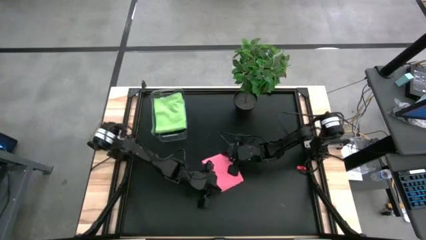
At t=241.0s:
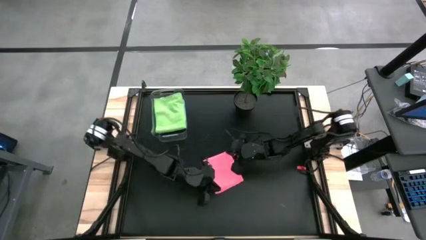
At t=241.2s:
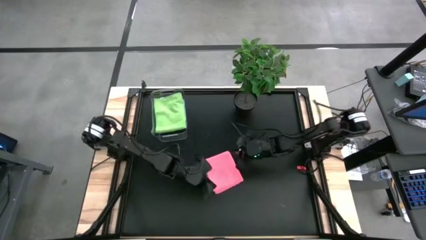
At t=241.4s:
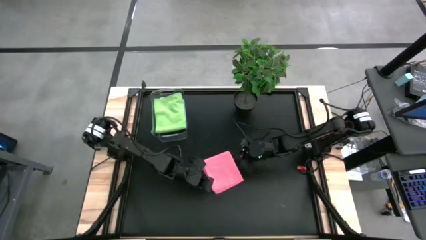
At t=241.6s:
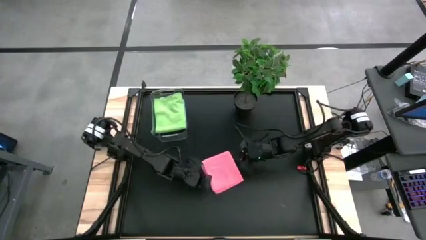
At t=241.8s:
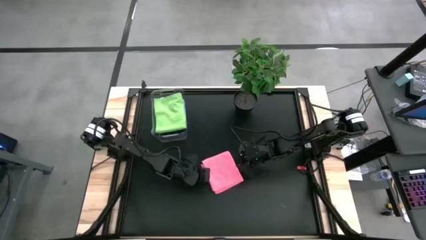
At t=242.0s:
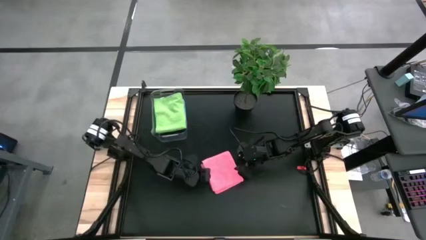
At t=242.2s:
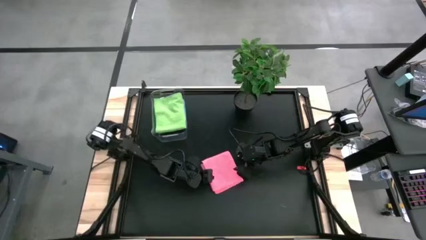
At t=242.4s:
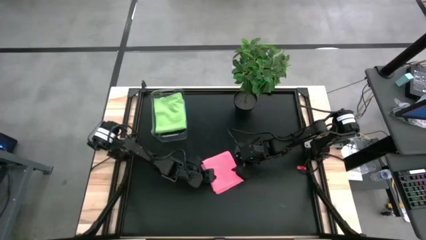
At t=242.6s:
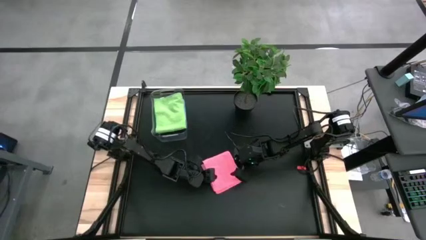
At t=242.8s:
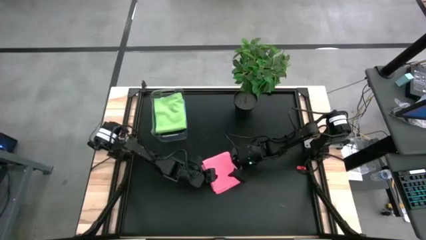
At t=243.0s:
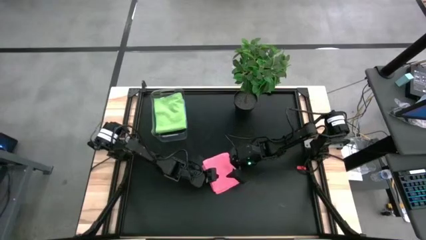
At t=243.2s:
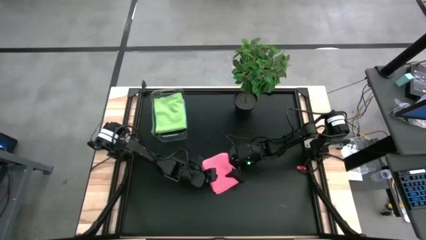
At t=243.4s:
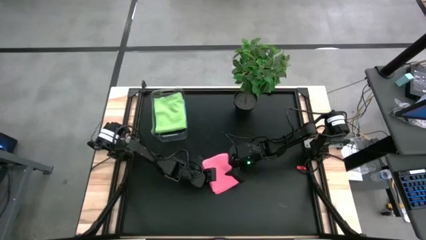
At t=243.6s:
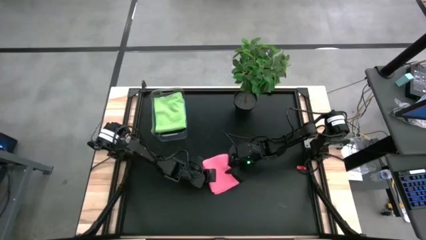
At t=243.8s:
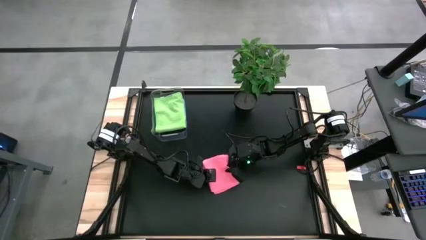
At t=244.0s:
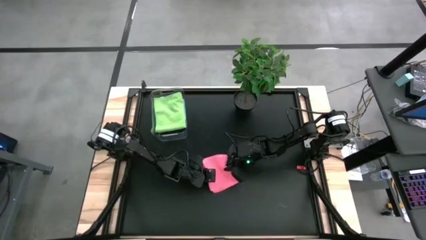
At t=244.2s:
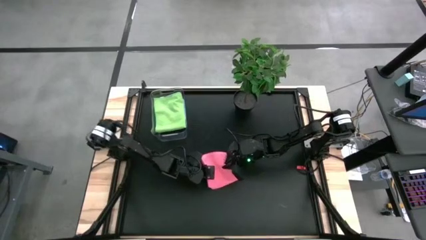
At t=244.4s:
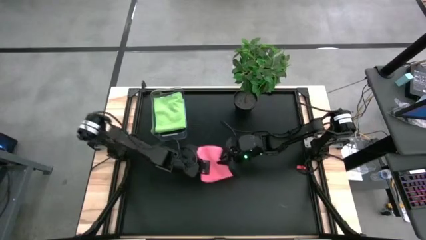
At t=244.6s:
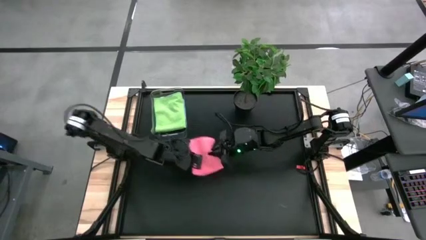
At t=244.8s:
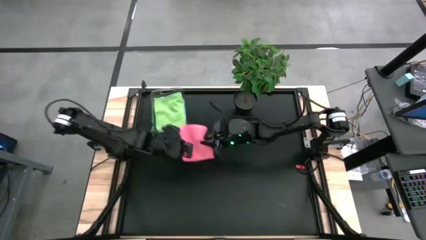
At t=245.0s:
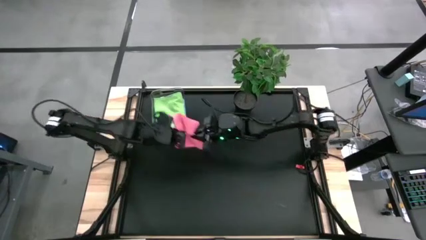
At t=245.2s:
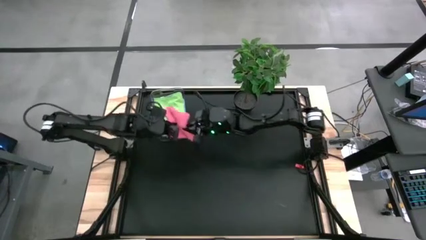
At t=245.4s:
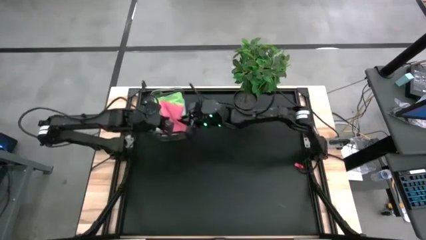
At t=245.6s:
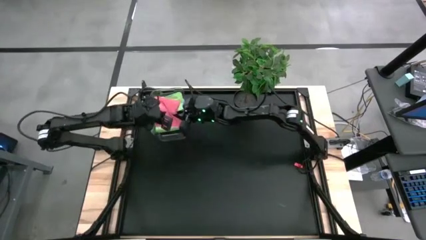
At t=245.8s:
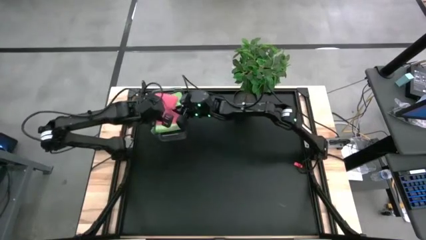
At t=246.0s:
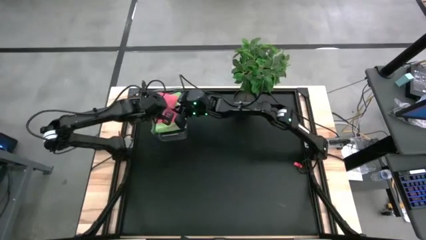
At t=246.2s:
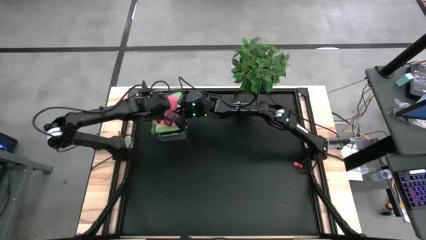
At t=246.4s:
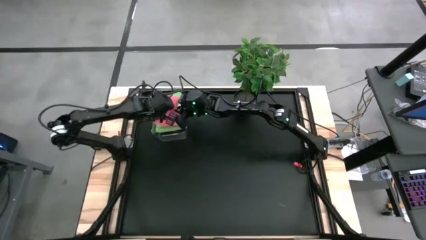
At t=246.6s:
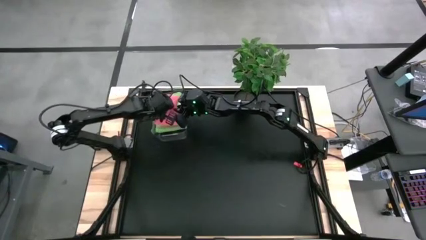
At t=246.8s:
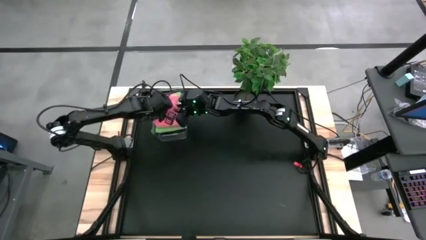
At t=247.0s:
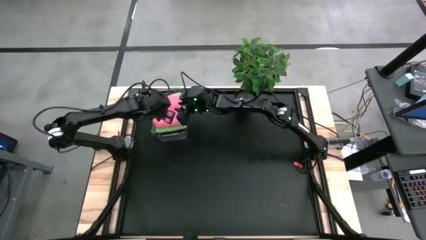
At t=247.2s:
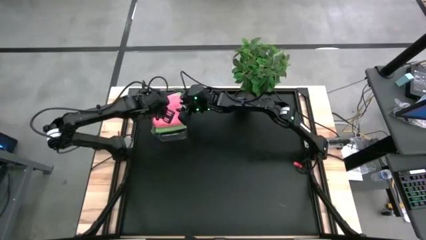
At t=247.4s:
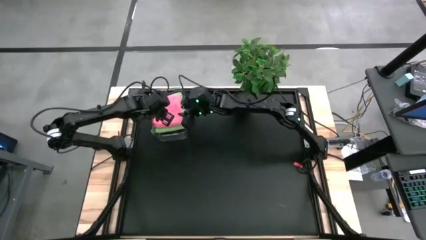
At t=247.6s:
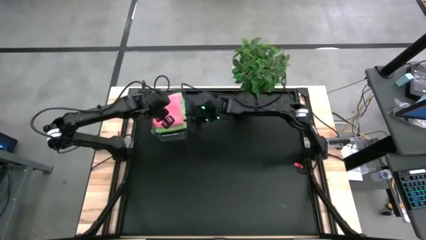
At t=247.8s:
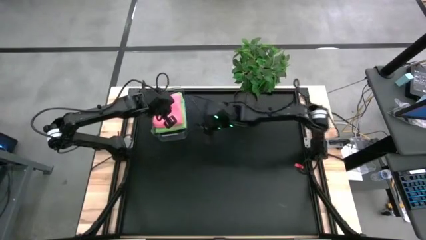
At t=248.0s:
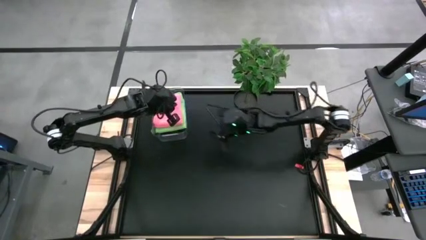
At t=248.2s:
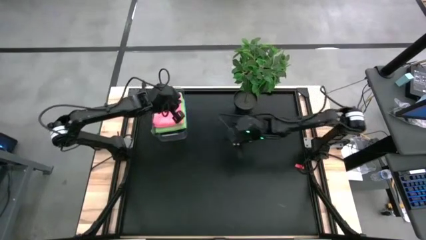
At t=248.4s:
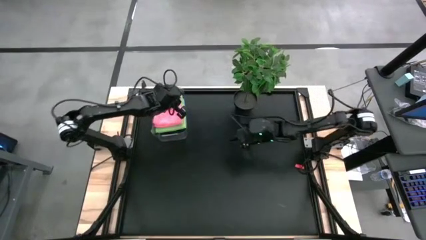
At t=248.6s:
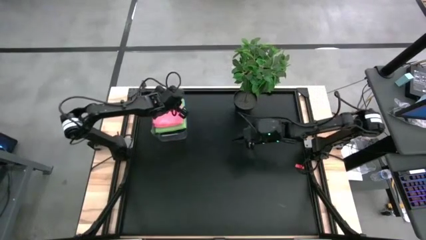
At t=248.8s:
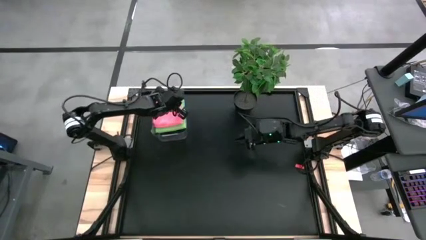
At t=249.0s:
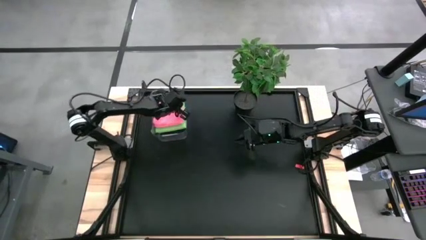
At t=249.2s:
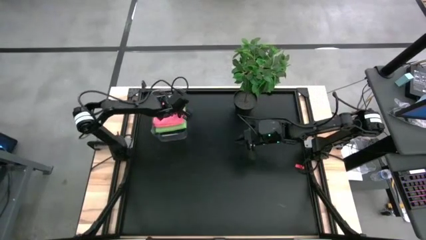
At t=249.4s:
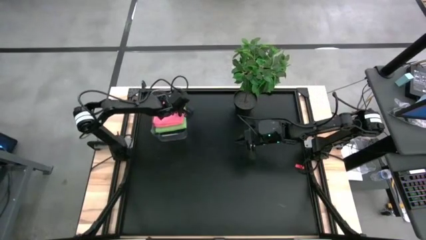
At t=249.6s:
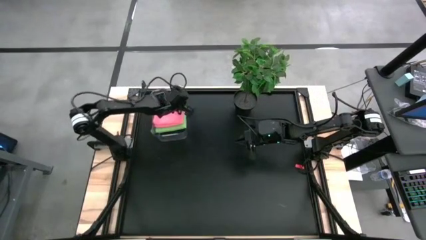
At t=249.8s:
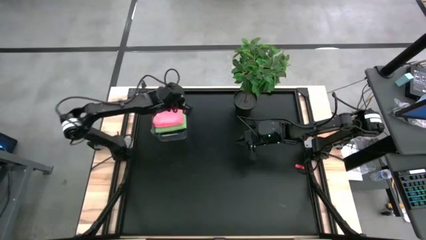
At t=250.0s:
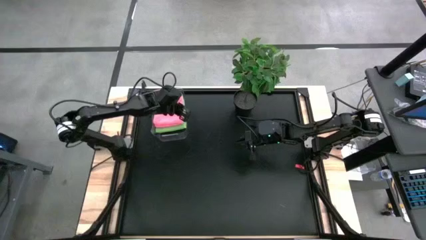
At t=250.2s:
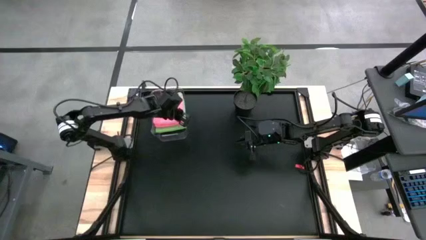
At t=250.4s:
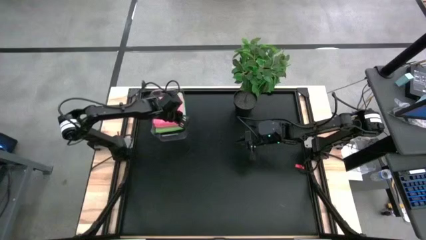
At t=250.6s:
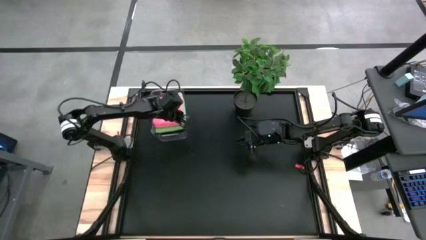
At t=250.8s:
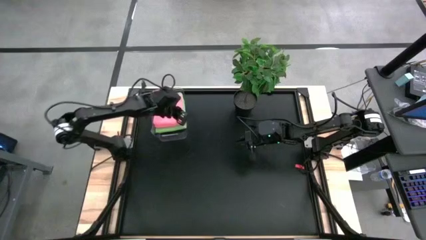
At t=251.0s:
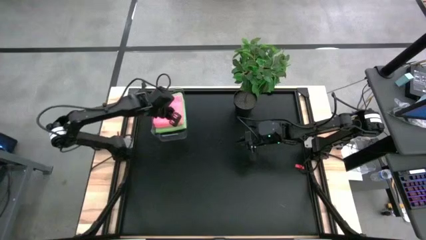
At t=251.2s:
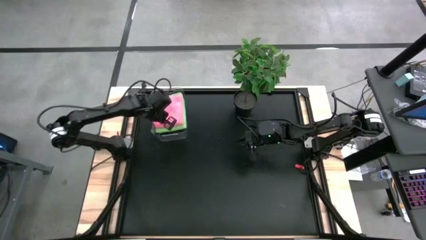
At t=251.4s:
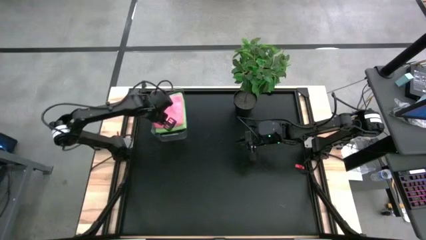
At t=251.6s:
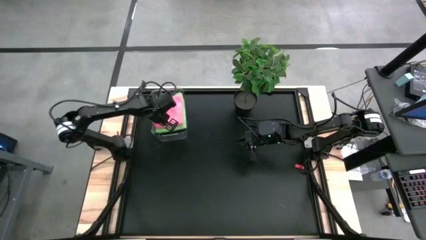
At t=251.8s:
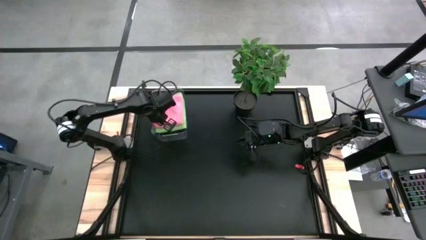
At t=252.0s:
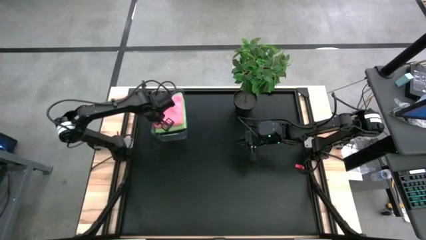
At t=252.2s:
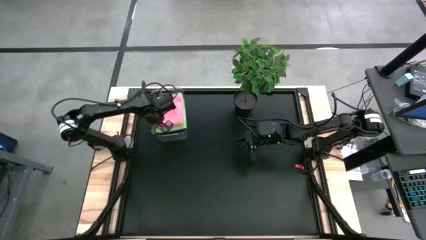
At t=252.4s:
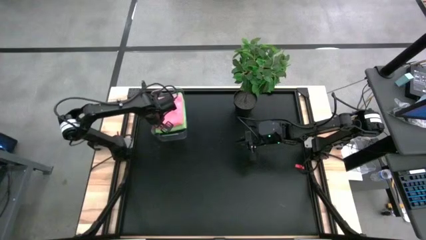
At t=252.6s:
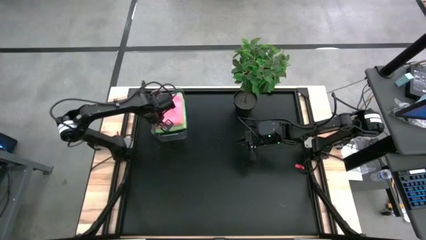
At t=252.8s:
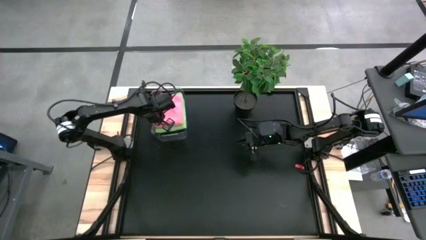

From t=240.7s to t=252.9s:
Task: Fold microfiber towels
Put the red micro fiber towel into the bin

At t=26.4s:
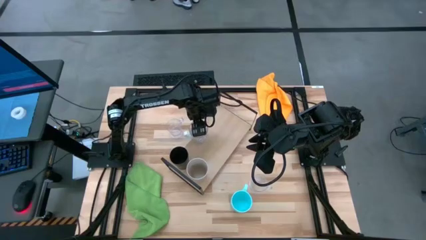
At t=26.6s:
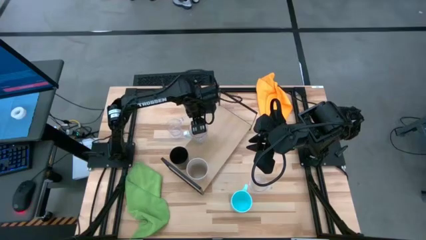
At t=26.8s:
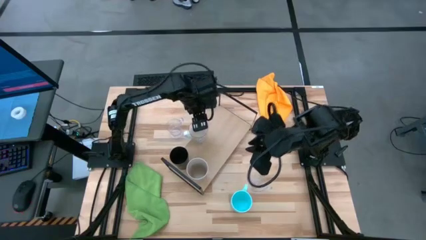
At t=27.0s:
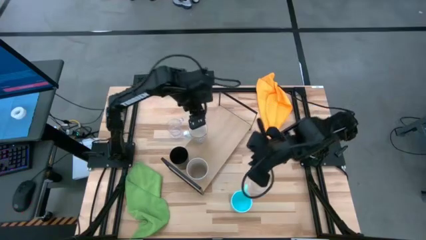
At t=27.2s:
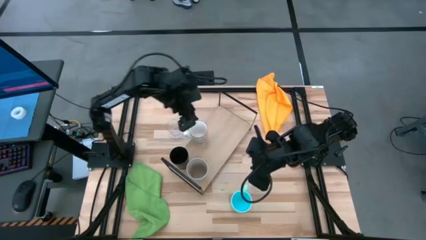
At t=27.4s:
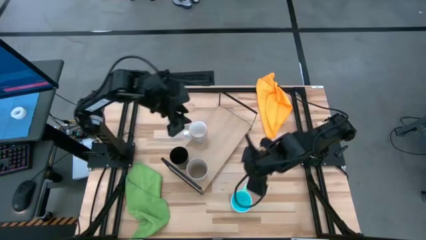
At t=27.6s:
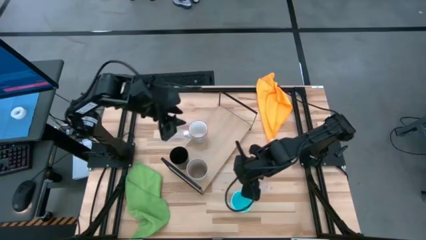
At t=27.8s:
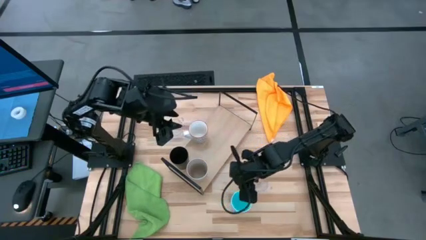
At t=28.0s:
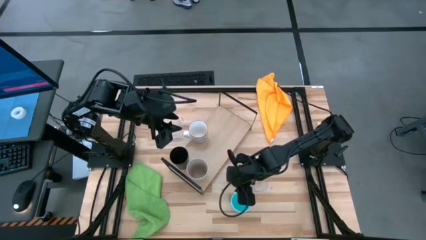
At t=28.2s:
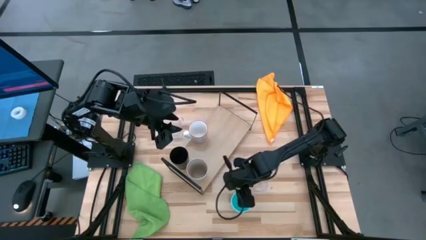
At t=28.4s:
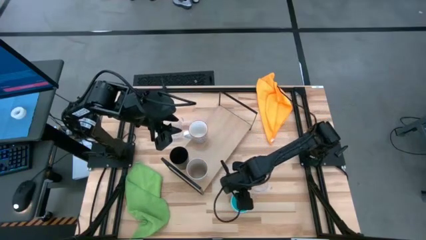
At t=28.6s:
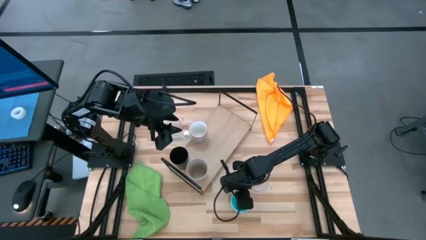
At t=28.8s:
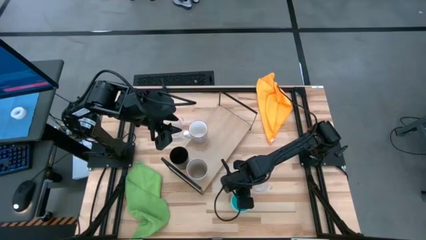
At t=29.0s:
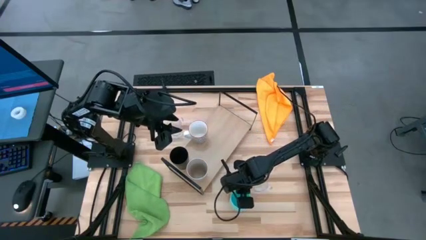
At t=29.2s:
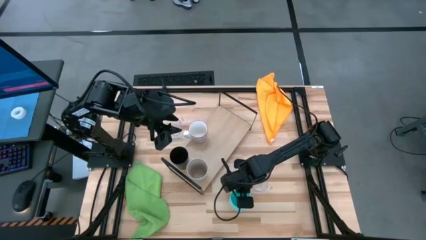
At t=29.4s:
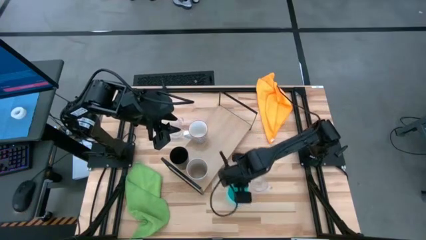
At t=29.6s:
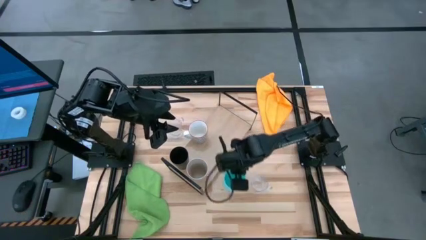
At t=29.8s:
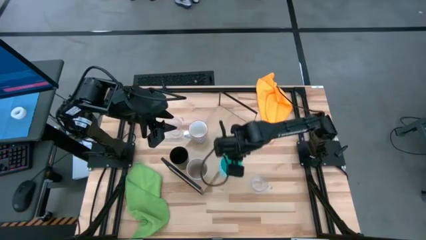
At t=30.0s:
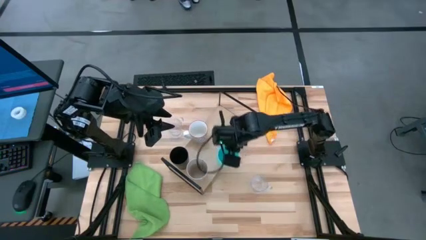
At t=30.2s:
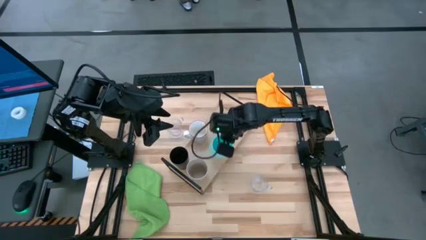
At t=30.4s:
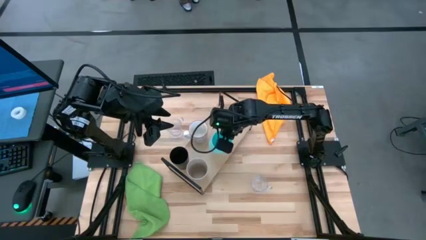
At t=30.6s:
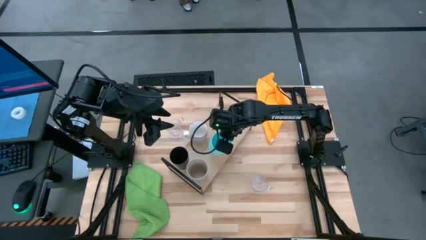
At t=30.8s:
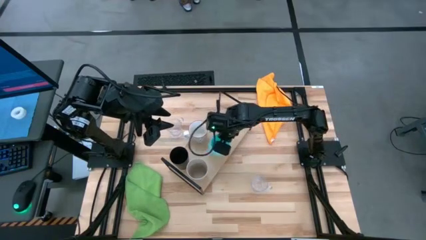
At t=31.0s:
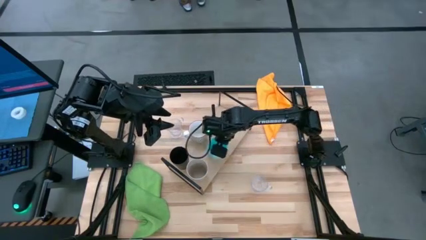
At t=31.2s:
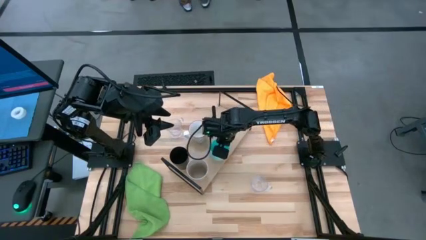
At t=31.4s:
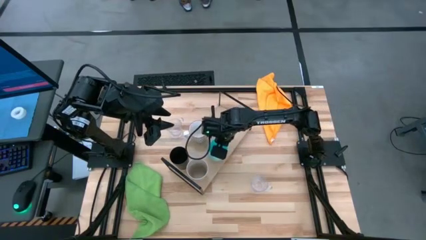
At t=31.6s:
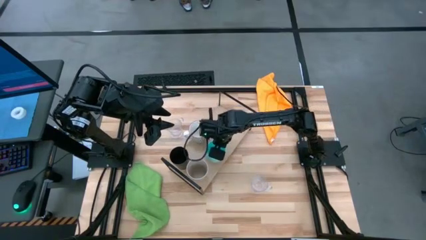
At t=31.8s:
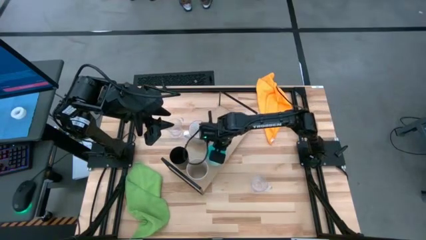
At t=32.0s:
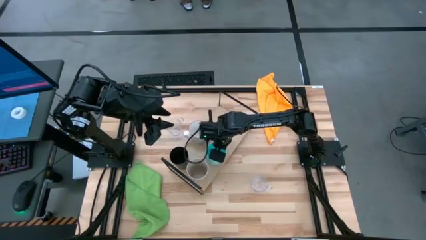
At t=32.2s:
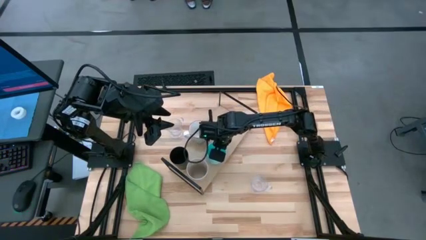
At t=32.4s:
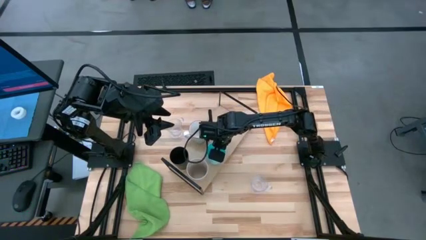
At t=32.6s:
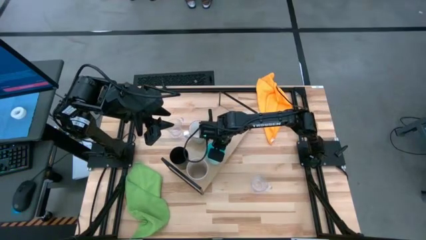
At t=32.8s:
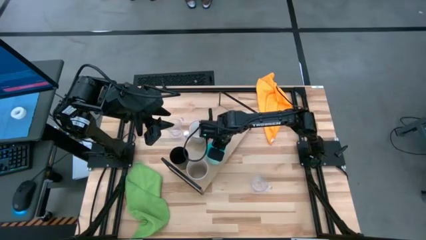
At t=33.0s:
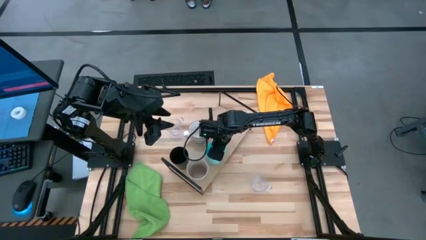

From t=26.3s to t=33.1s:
Task: Stack small to large cups/mugs on shelf
Put the blue cup on the shelf aligned with the white cup
